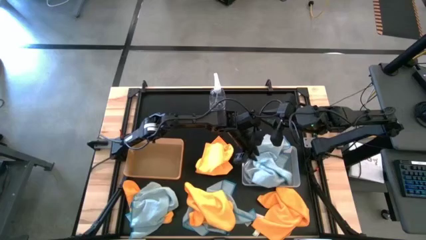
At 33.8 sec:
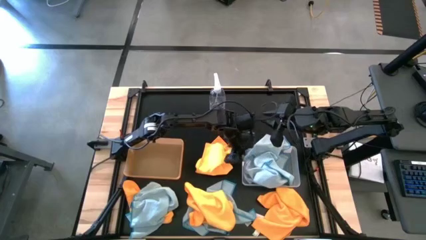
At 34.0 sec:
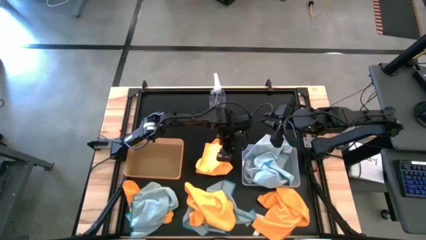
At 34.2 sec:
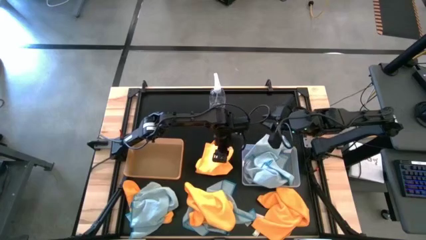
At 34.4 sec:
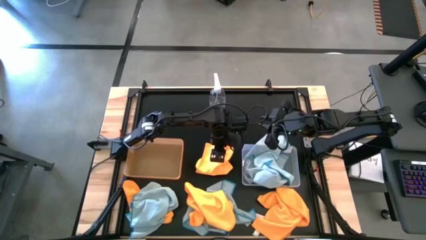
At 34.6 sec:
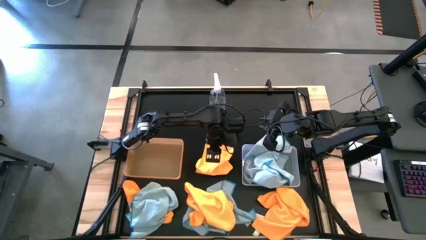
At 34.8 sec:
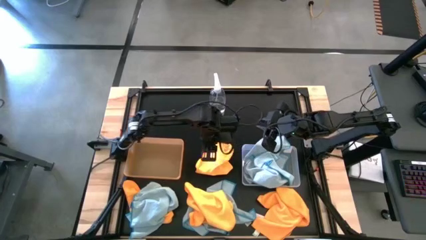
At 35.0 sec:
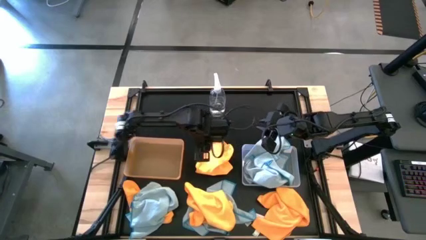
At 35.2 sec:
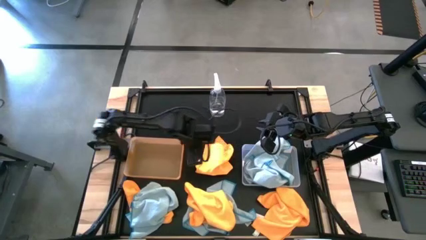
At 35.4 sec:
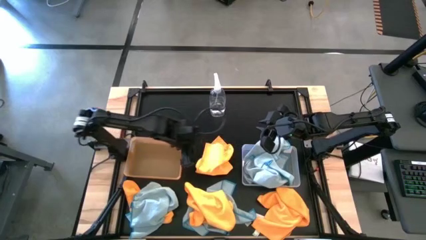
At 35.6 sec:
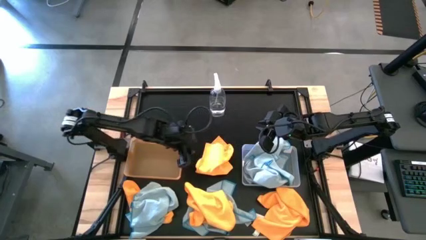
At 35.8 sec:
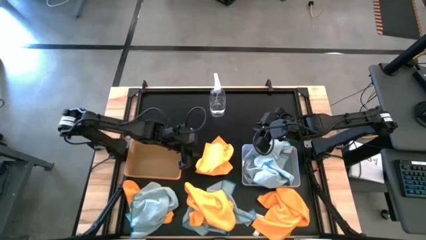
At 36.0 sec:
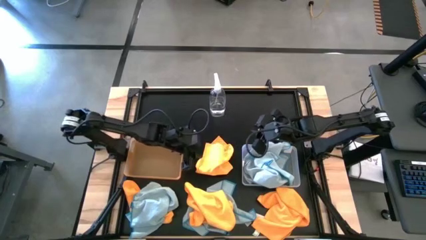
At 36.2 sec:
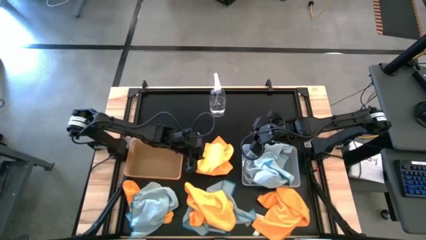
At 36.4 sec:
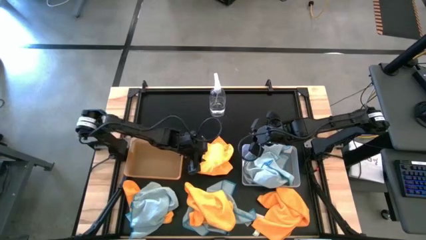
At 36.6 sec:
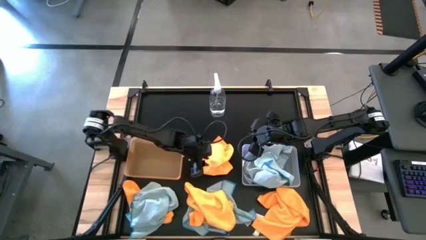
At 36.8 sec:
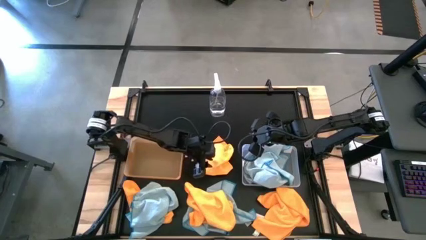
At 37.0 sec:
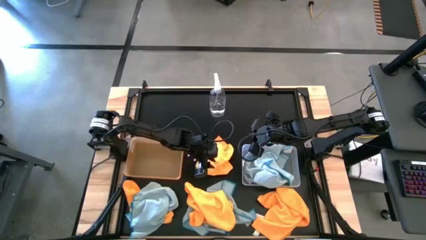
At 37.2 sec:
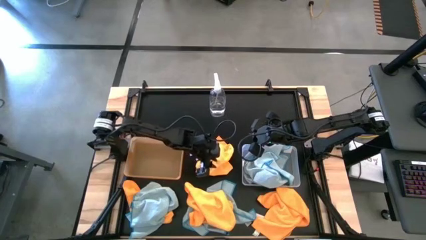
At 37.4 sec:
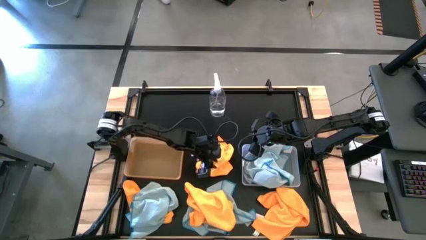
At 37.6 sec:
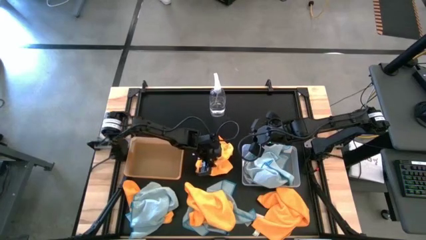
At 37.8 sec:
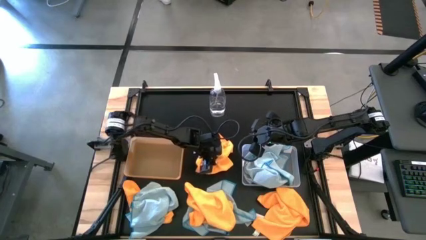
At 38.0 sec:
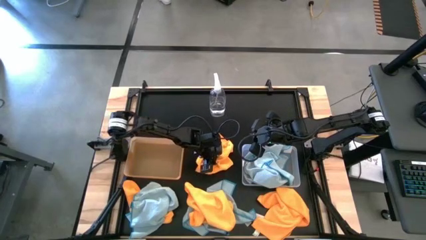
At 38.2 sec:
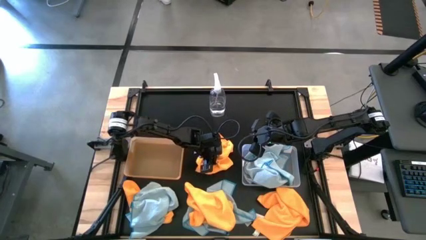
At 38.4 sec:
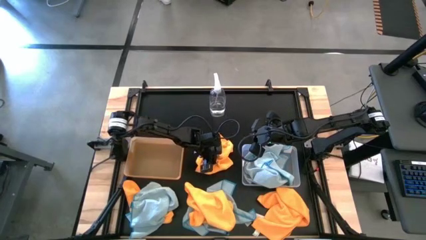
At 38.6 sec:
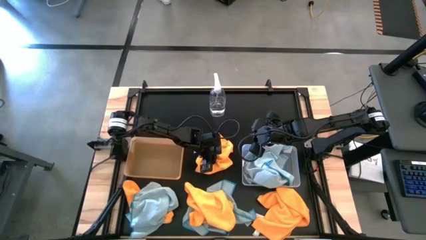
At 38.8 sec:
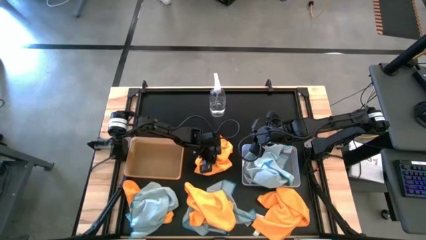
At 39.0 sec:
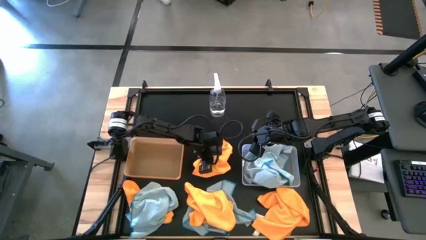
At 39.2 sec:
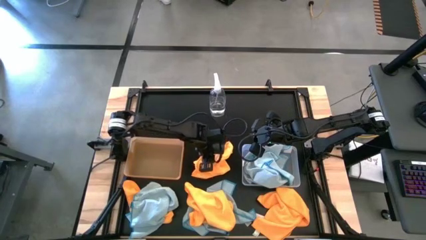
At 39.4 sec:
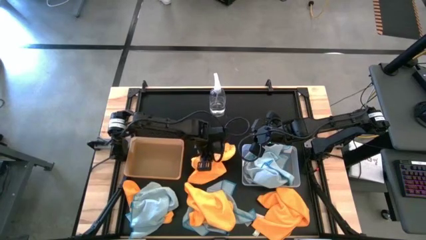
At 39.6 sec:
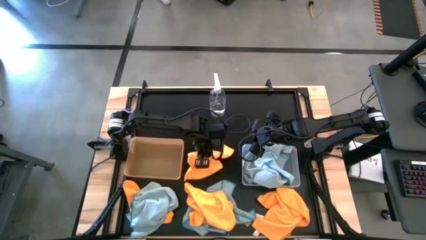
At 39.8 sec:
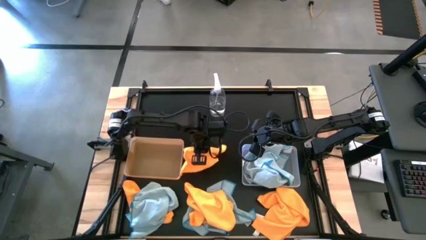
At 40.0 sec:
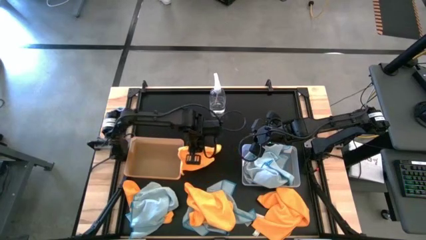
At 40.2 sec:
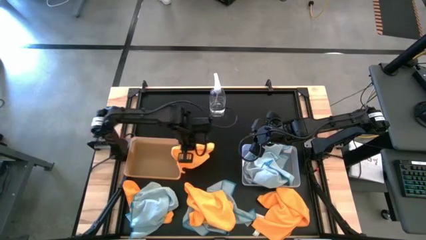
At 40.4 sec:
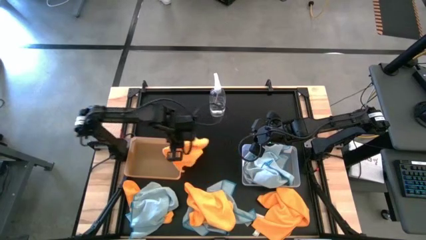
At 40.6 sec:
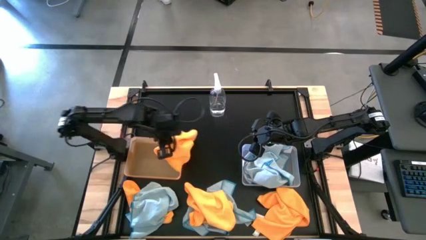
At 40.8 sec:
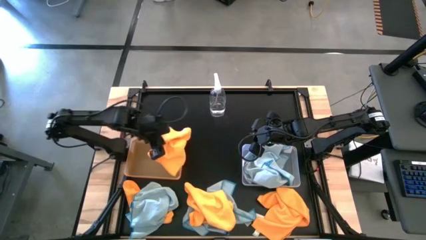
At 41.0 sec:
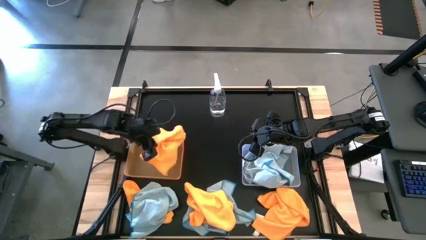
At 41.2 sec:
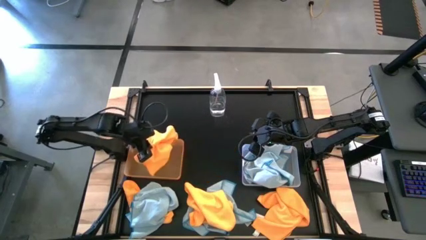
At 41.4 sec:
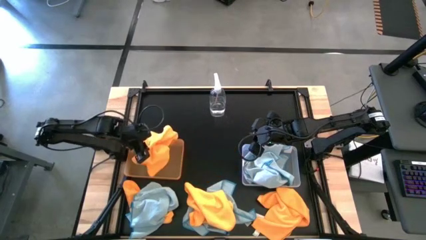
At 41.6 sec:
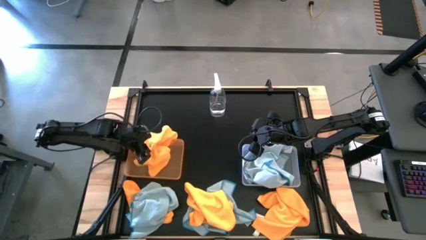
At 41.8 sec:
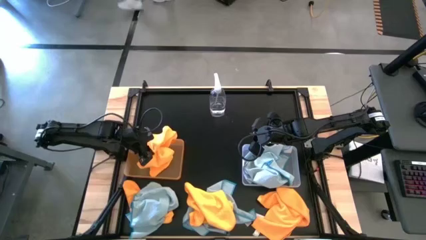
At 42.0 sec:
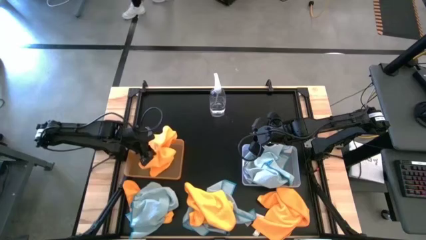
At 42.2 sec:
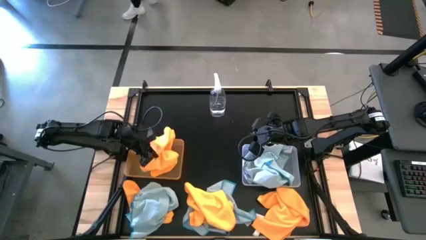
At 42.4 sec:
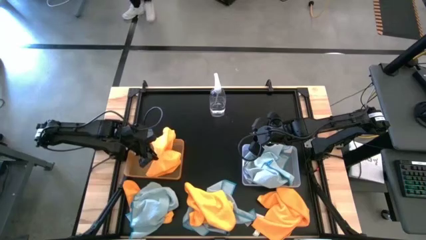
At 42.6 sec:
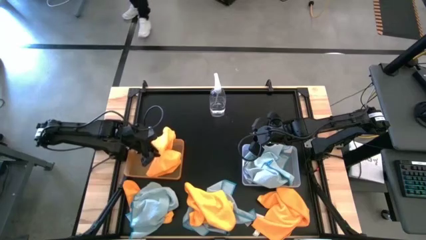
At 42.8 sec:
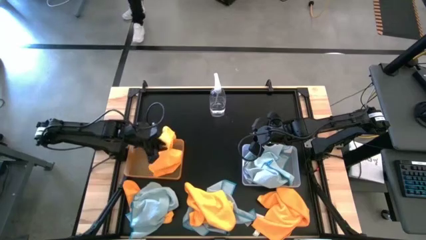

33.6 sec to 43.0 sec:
Task: Sort microfiber towel by color & place in baskets
Put the top orange microfiber cloth into the orange bin

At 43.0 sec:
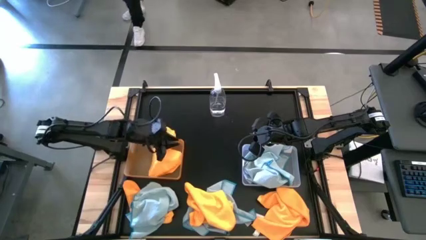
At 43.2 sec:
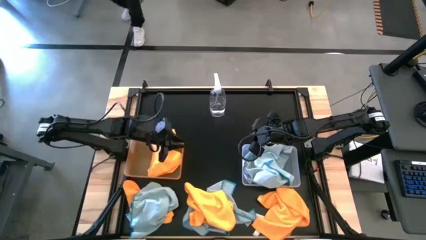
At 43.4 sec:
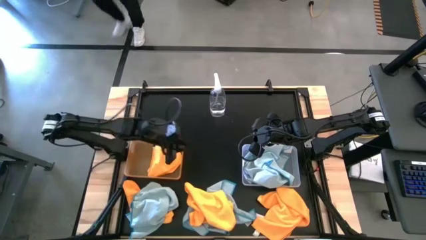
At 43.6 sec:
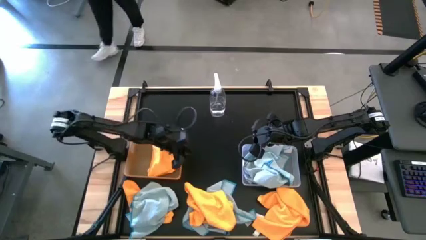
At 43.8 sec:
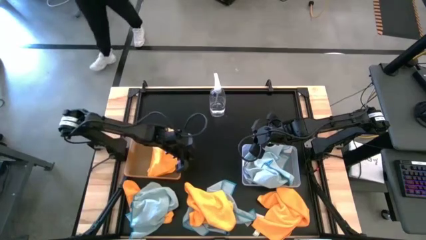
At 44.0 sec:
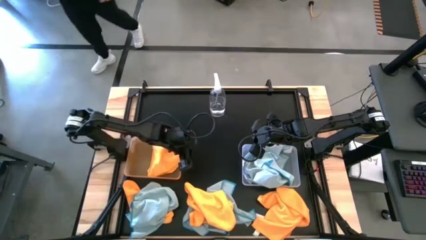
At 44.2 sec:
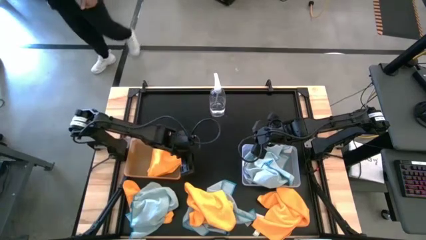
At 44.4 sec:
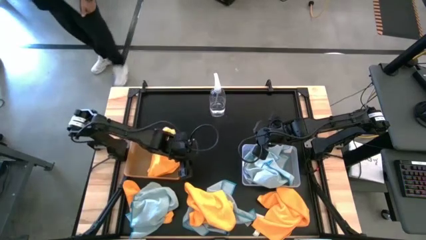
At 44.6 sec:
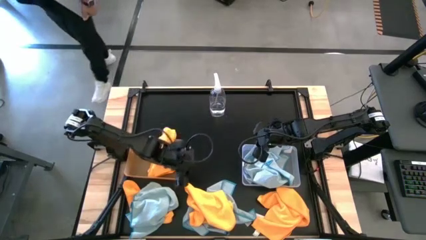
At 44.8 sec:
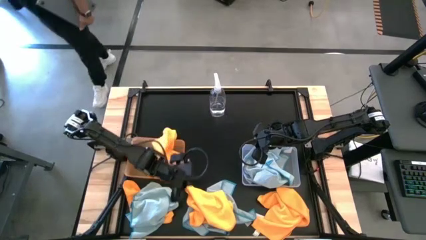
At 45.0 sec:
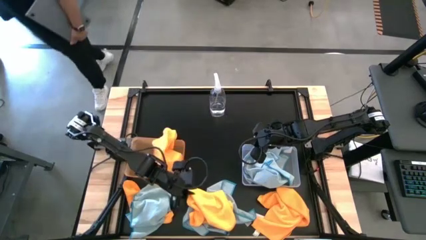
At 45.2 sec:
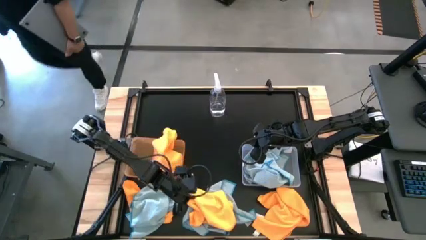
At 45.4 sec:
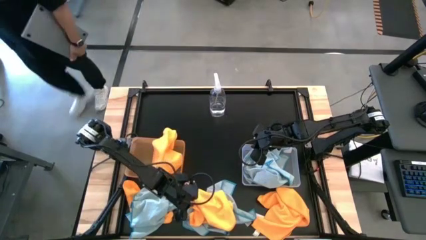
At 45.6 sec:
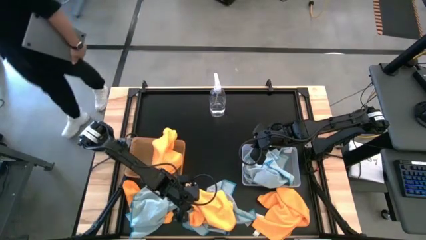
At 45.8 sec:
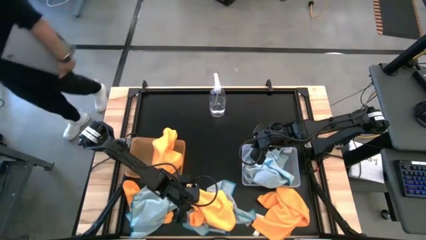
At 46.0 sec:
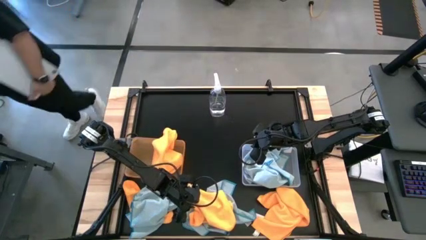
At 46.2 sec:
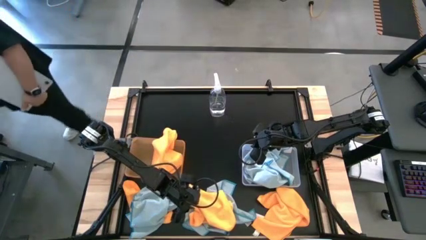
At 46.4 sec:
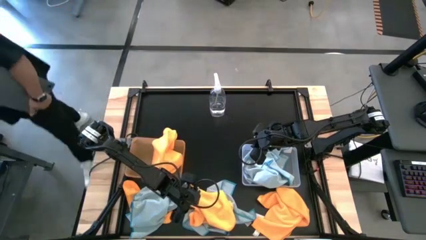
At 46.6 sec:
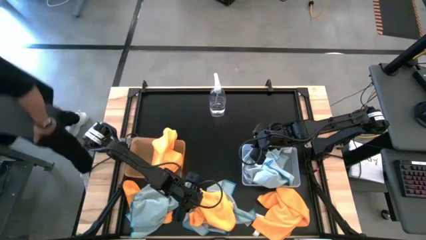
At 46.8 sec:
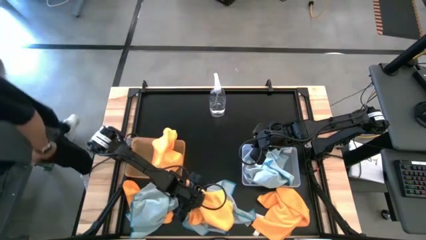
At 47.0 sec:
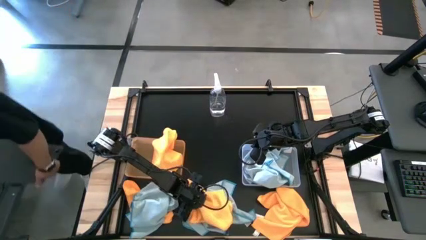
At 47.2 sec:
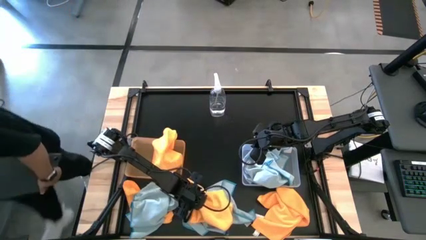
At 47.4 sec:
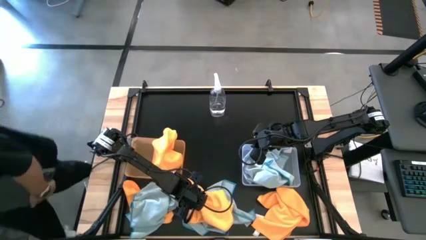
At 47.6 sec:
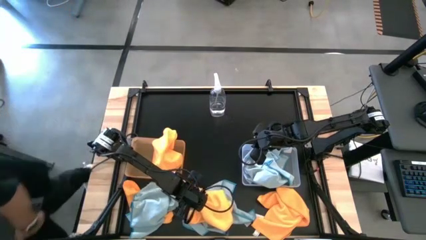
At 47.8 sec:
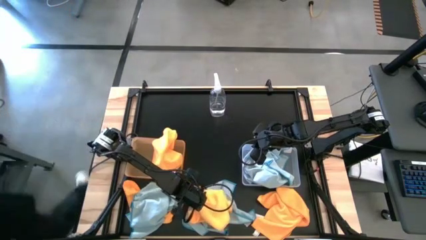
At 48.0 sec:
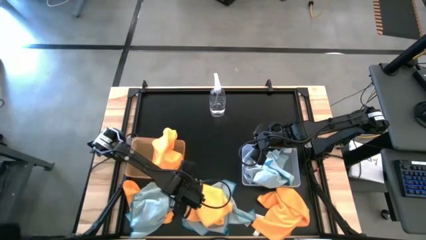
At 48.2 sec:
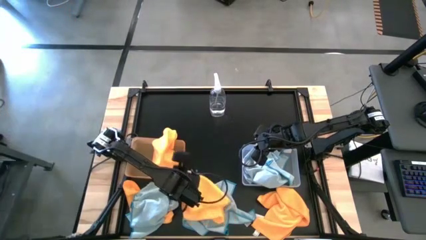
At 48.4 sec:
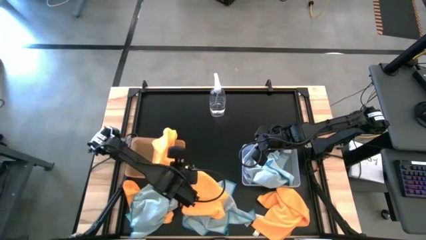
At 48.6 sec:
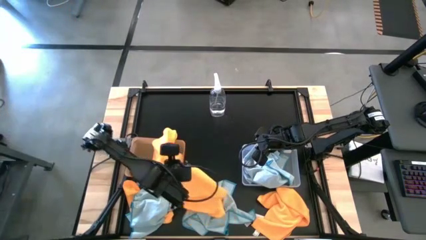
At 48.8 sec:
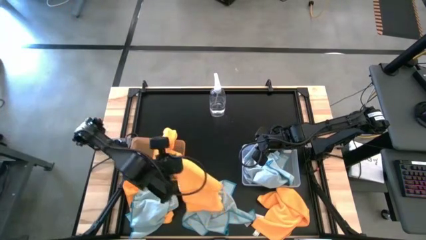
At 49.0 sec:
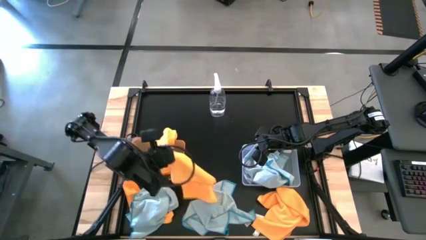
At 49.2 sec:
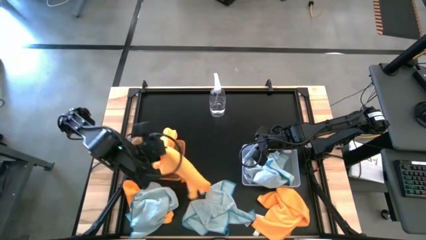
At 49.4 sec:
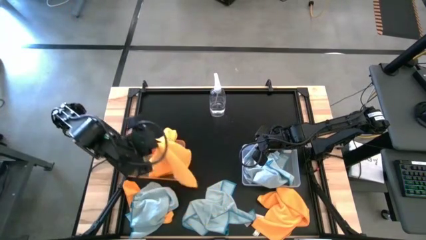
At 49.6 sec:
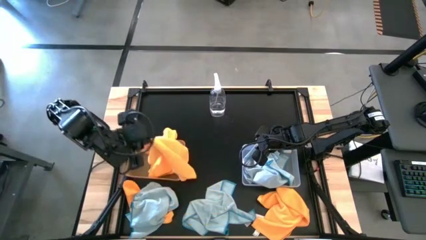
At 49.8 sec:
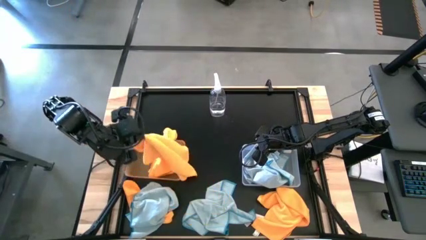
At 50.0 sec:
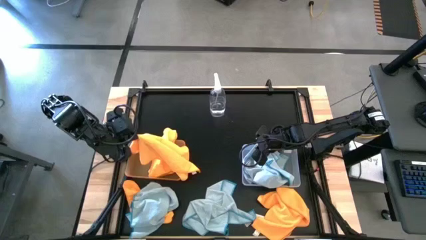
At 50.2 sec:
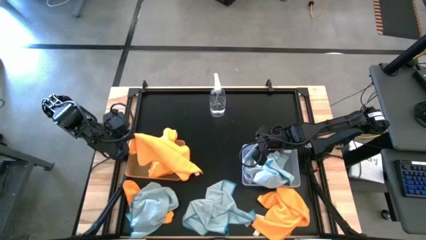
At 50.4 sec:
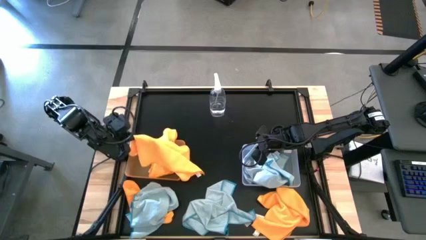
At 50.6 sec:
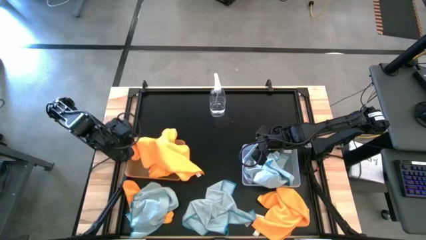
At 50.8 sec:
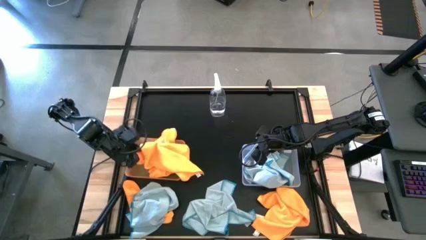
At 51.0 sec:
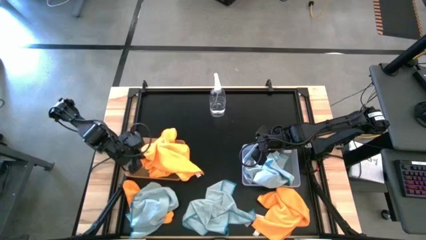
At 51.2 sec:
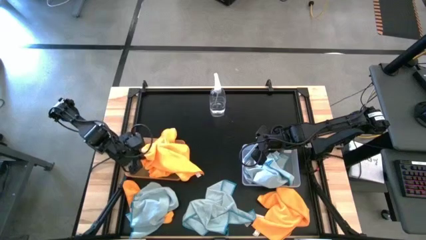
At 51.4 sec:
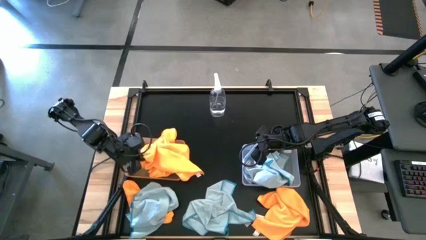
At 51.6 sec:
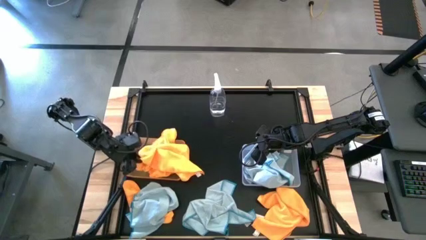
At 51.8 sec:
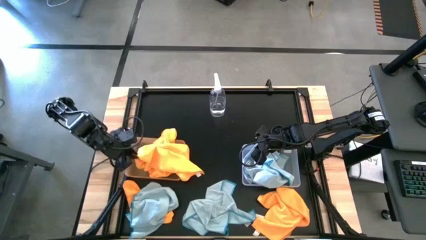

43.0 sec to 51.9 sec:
Put the middle orange microfiber cloth into the orange bin
